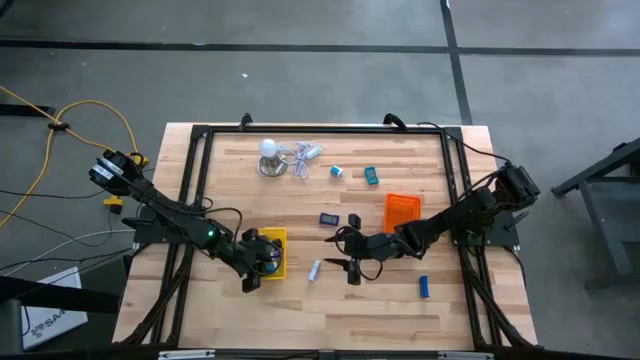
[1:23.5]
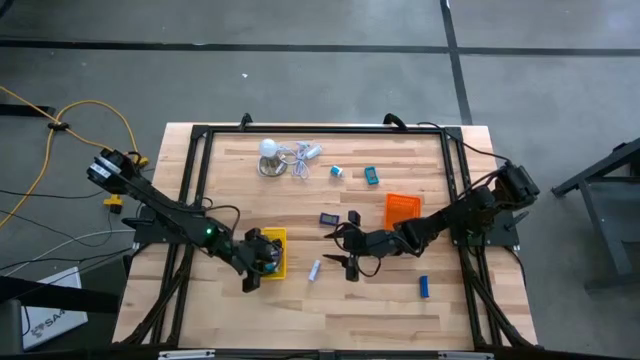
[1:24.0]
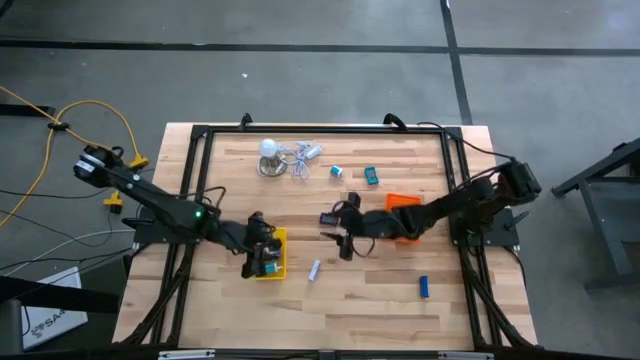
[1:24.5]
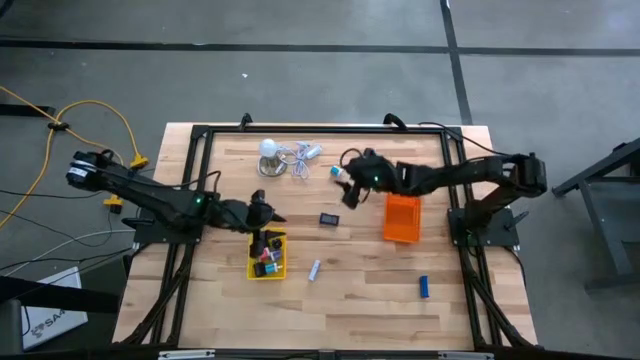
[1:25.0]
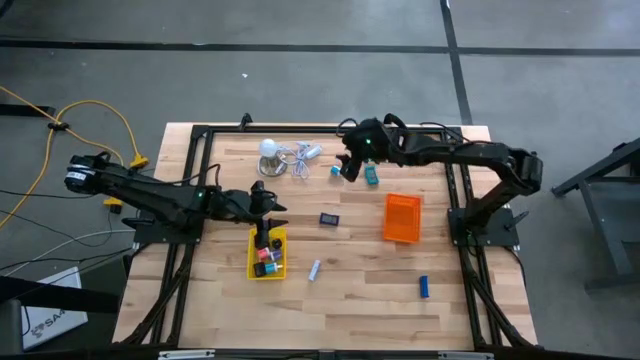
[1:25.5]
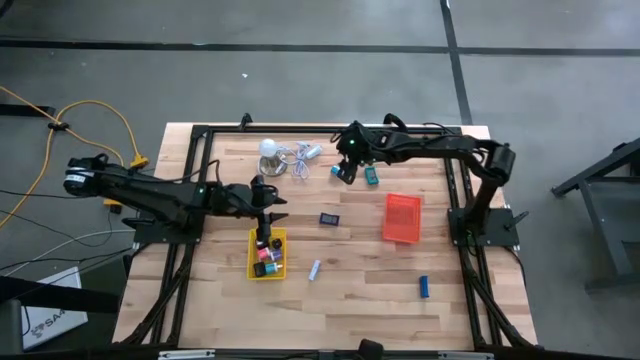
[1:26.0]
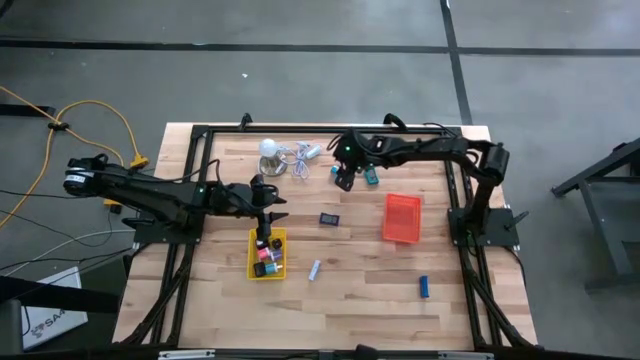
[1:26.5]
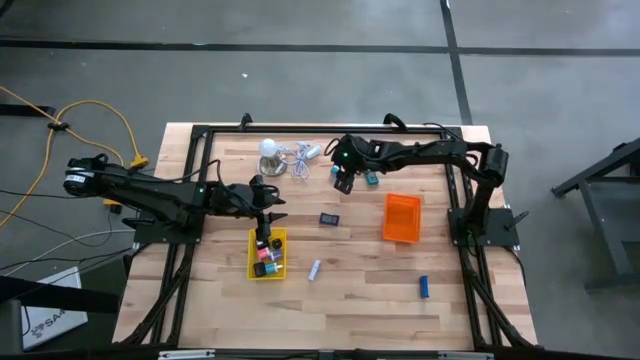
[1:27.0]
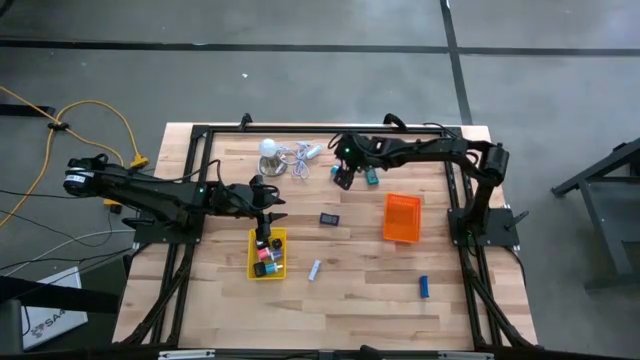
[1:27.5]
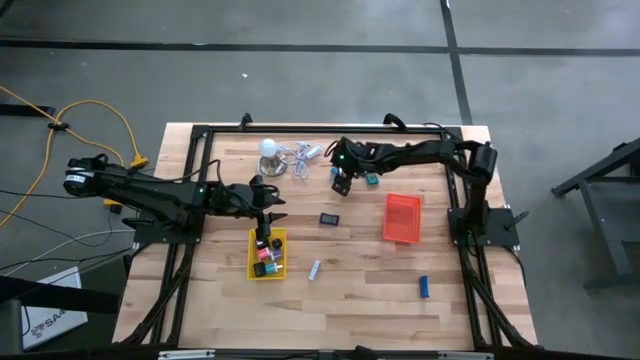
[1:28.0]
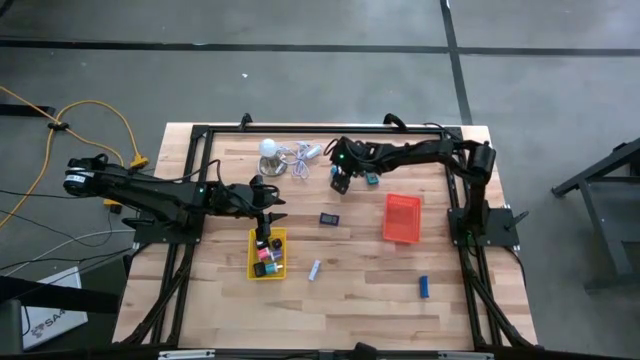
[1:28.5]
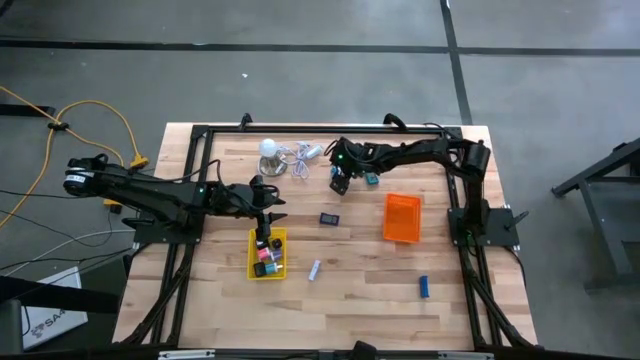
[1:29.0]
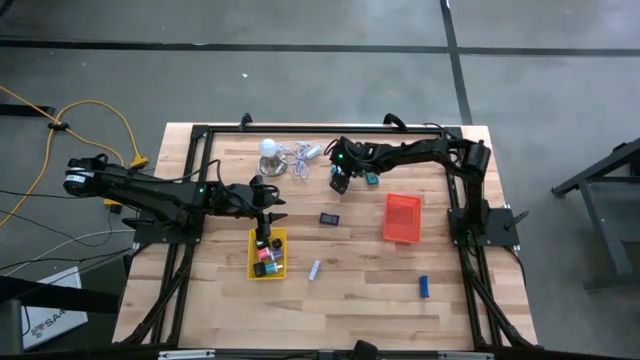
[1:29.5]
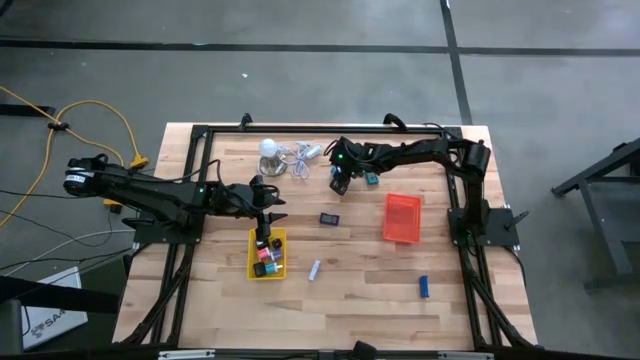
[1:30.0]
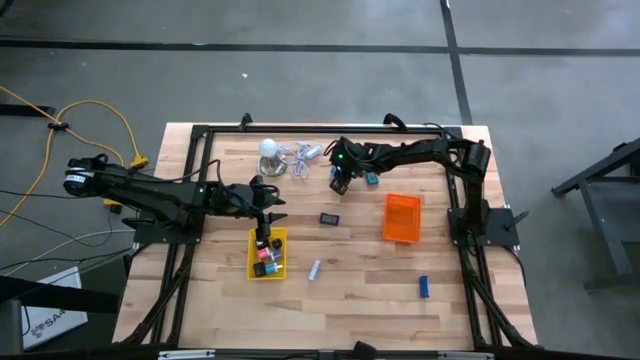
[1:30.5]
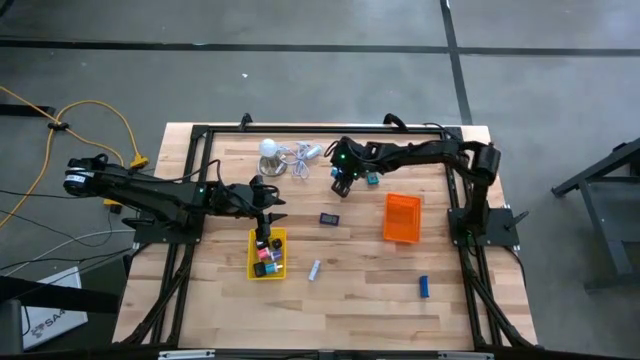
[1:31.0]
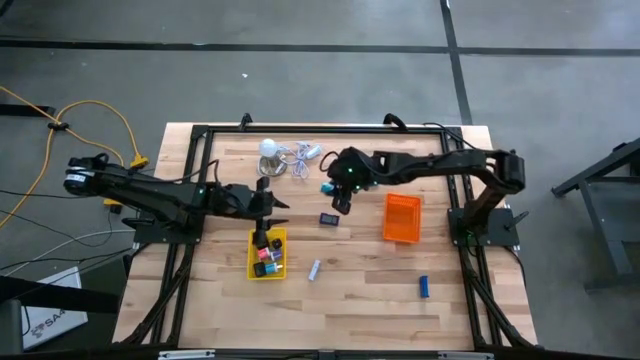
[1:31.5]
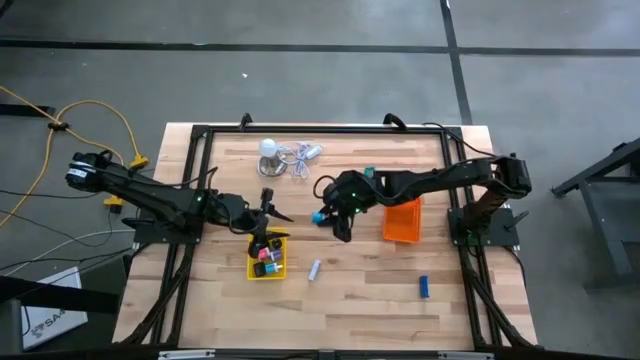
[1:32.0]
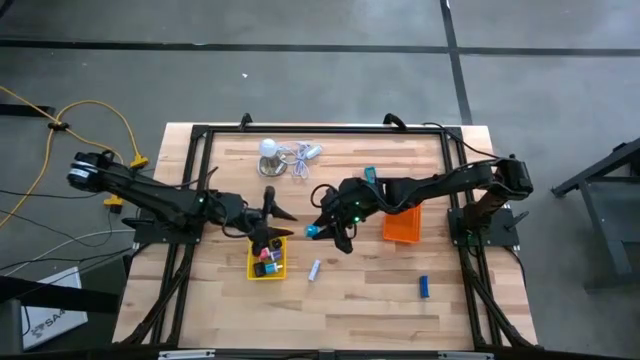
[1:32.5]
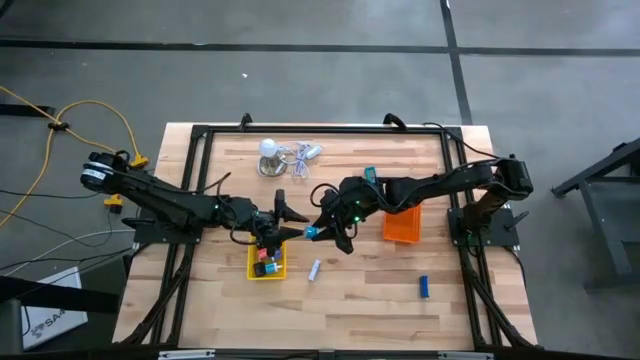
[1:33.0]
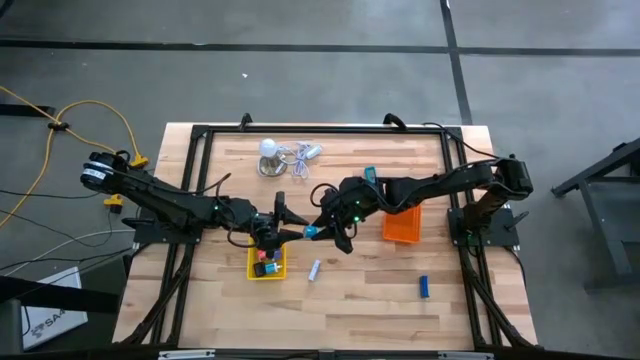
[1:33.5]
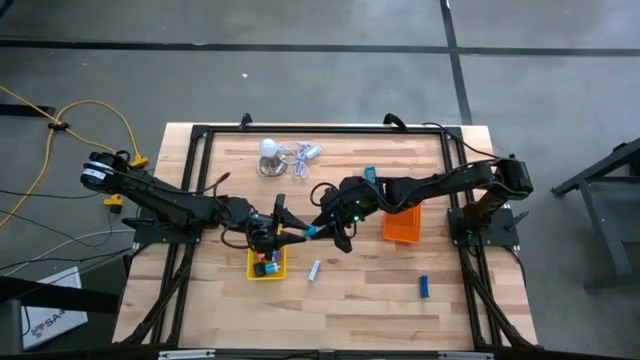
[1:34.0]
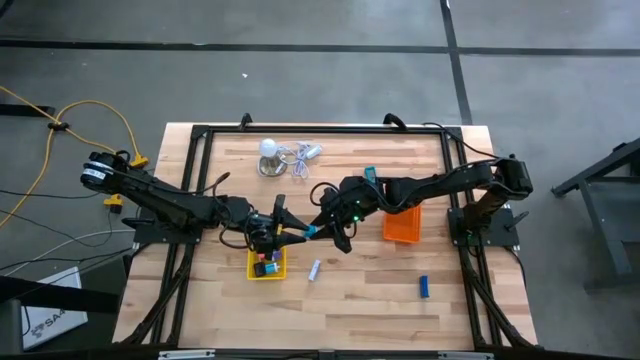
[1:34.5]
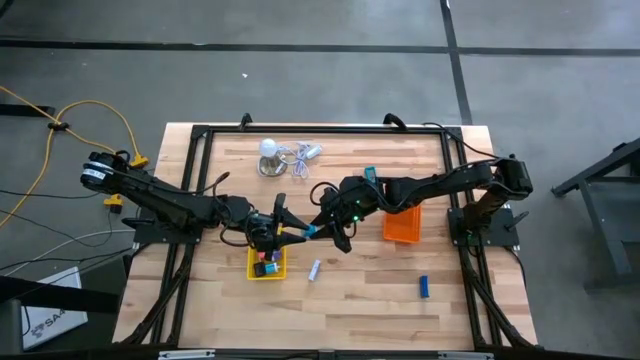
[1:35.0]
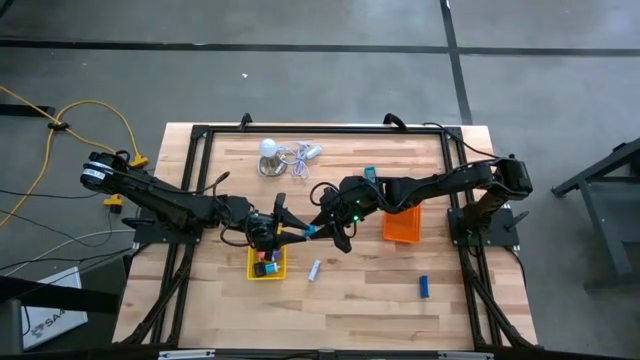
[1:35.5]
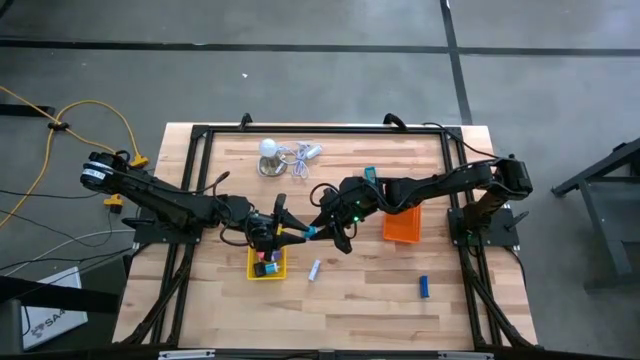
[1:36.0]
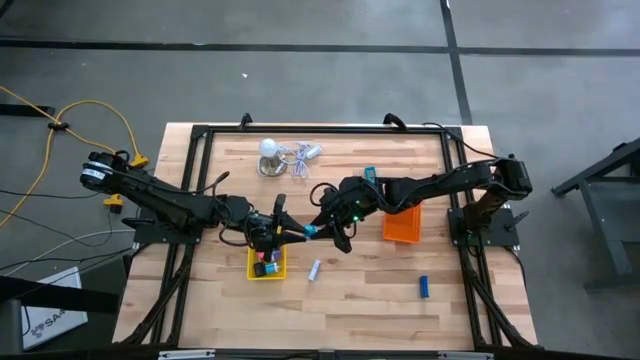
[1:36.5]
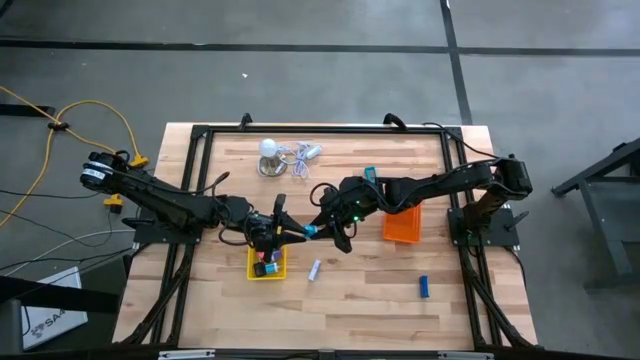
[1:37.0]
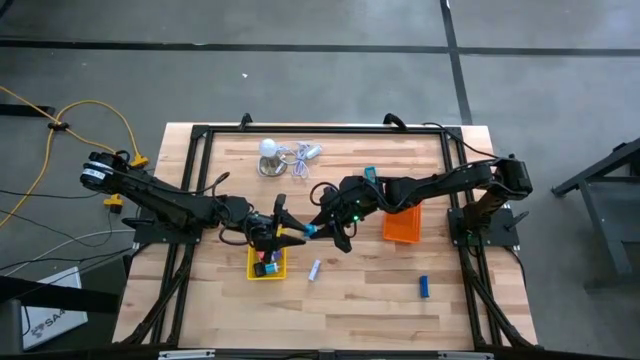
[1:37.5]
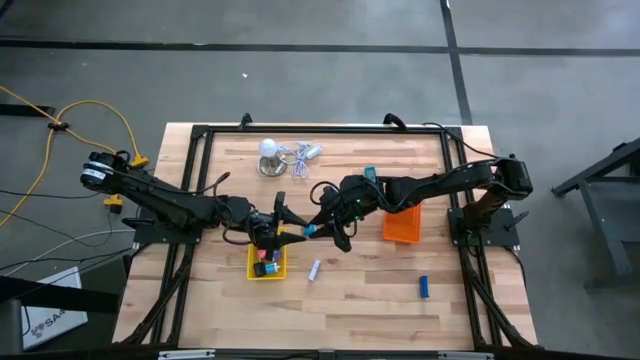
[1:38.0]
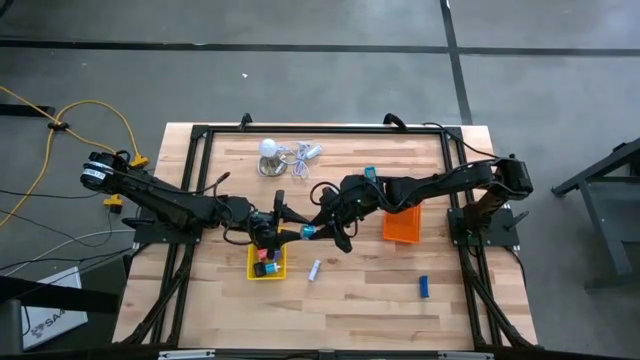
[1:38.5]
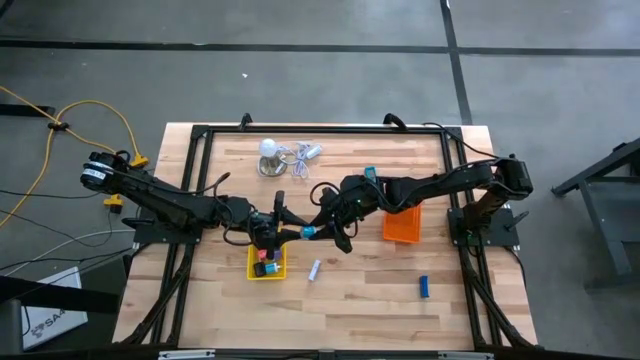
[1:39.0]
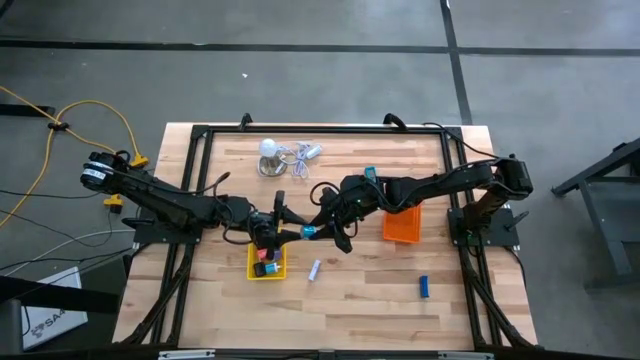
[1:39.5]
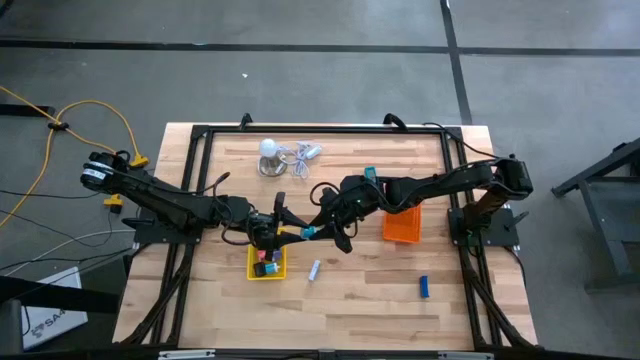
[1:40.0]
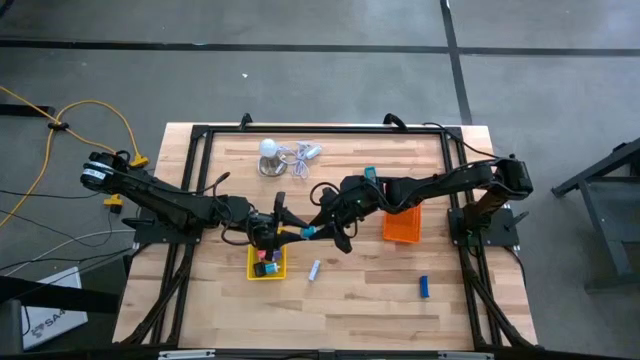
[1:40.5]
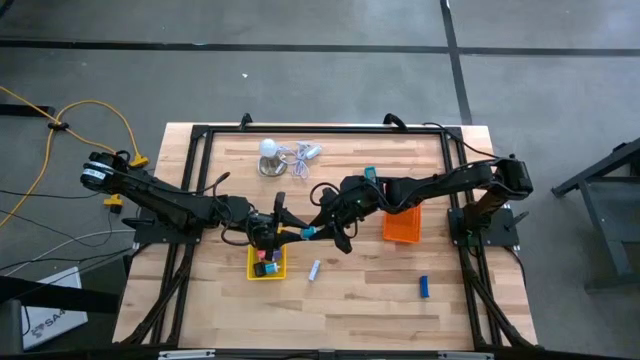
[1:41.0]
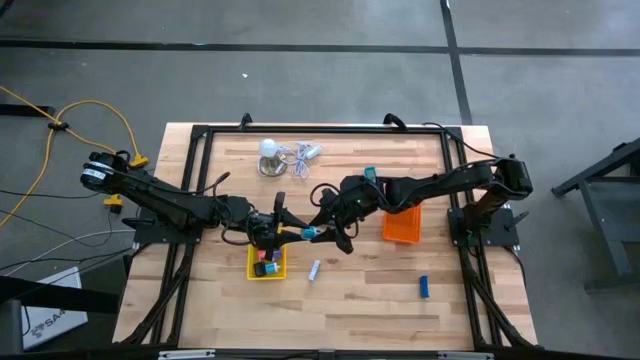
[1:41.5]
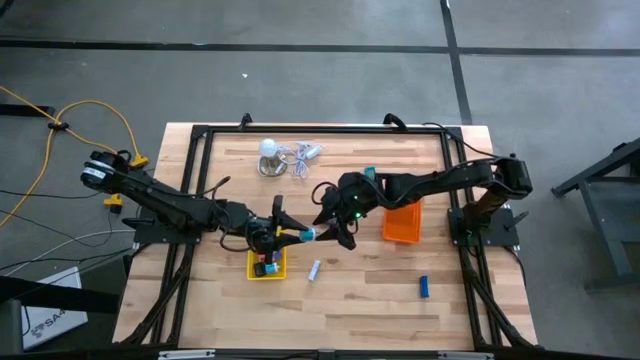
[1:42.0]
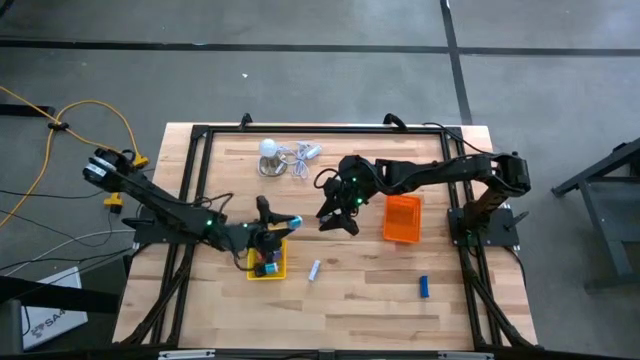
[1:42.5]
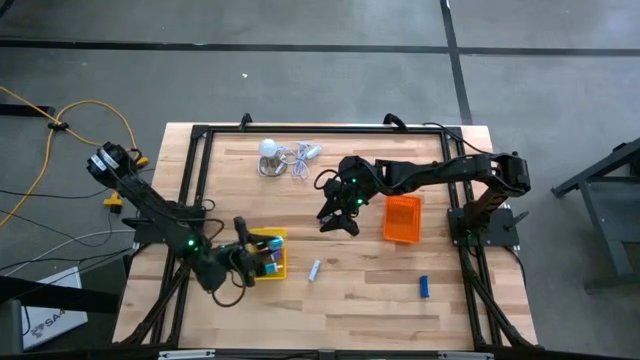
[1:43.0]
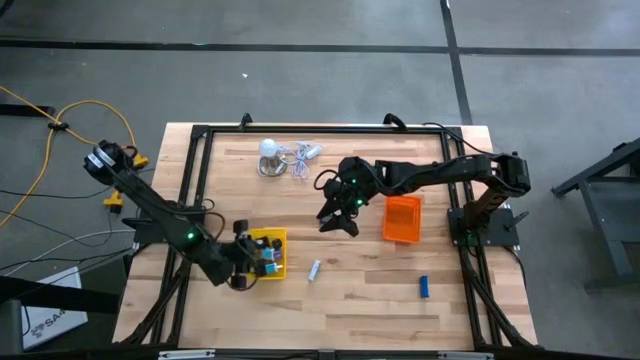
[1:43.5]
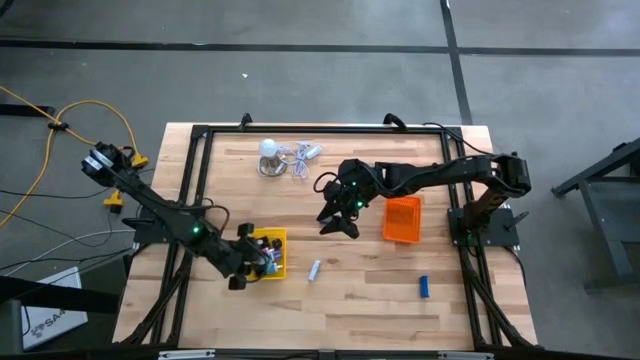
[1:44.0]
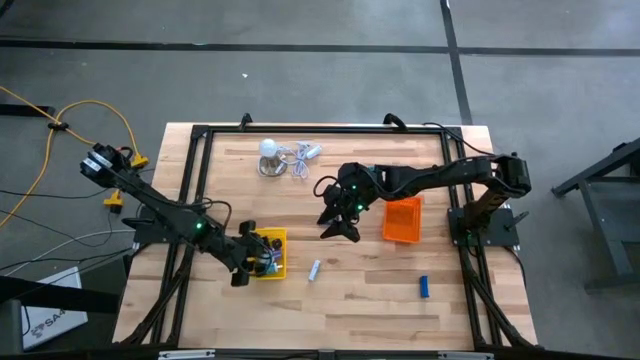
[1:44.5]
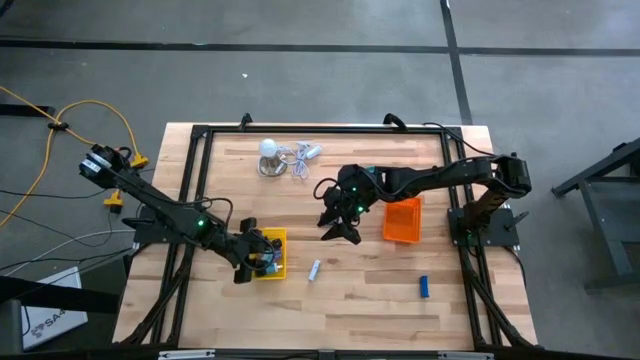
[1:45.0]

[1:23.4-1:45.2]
Task: Pick & Place Office items
Put the blue charger adapter into the yellow bin
